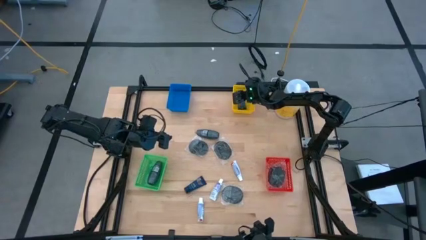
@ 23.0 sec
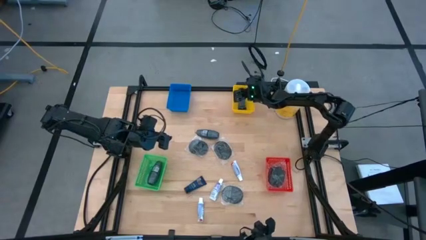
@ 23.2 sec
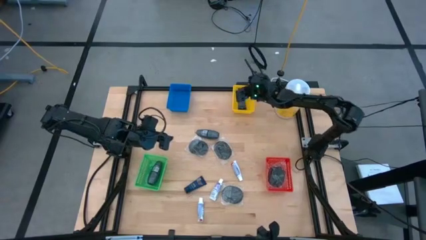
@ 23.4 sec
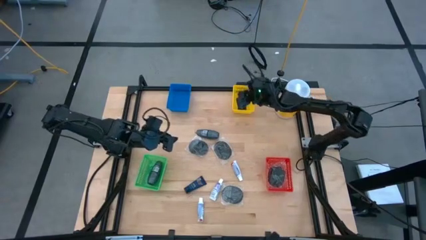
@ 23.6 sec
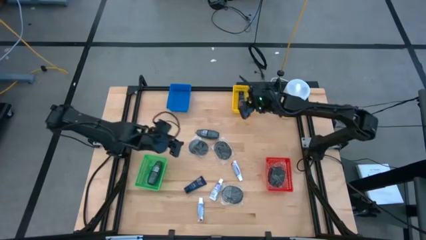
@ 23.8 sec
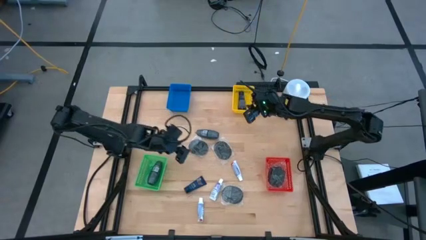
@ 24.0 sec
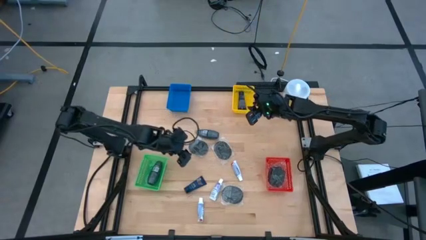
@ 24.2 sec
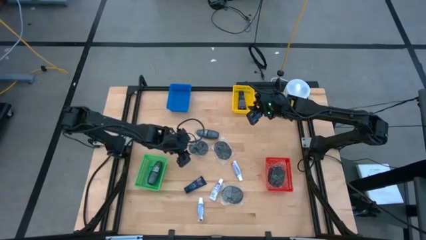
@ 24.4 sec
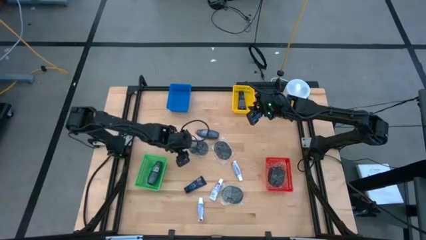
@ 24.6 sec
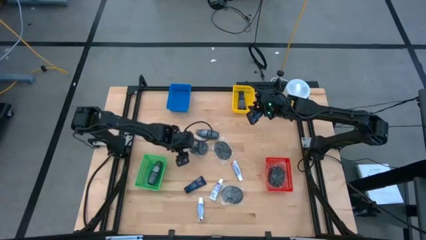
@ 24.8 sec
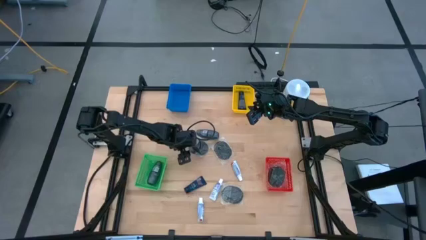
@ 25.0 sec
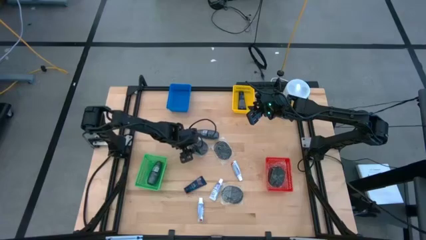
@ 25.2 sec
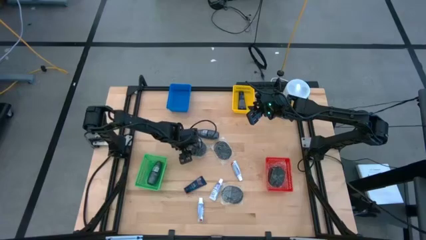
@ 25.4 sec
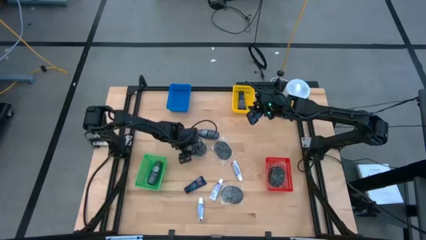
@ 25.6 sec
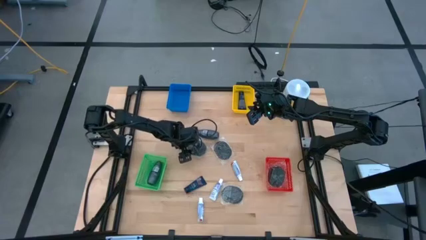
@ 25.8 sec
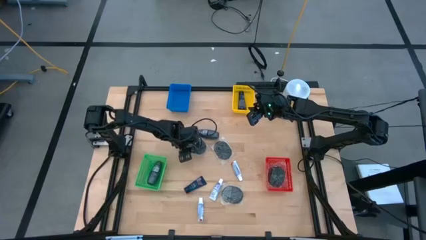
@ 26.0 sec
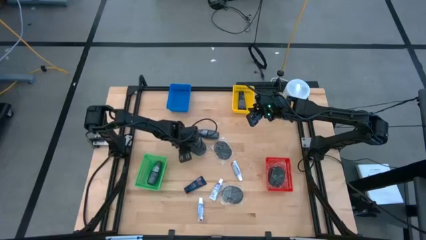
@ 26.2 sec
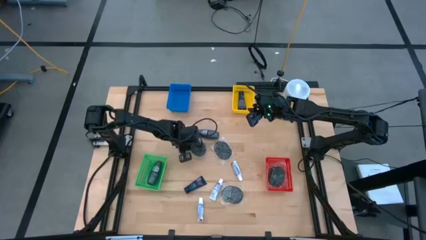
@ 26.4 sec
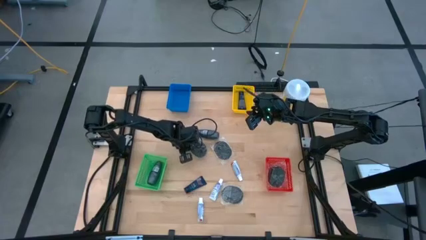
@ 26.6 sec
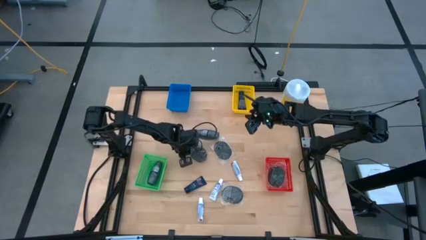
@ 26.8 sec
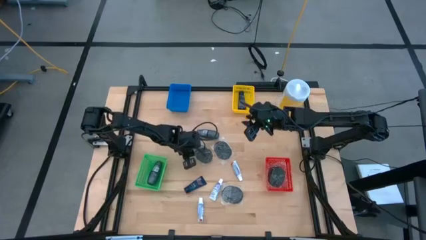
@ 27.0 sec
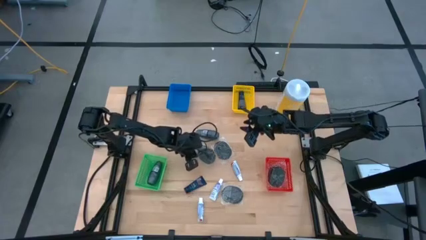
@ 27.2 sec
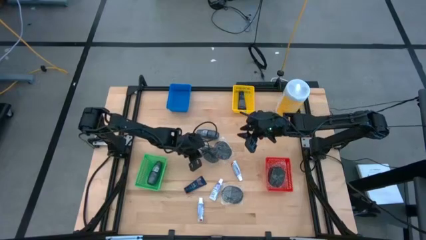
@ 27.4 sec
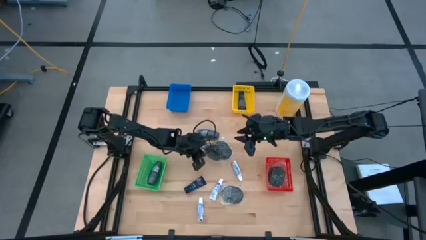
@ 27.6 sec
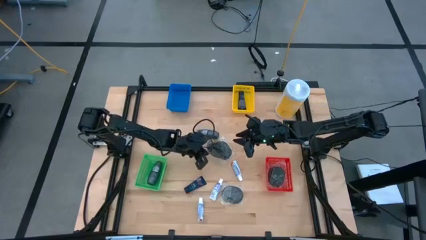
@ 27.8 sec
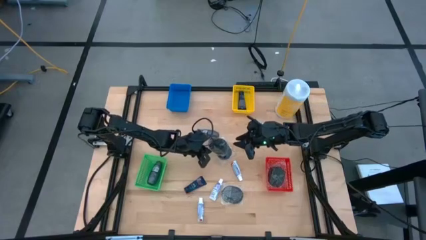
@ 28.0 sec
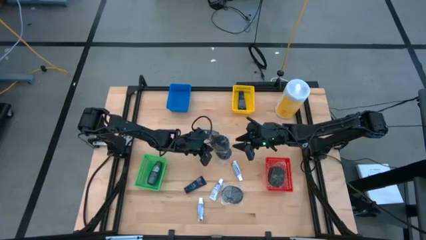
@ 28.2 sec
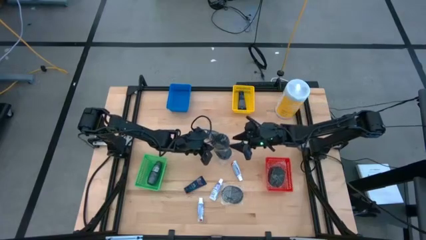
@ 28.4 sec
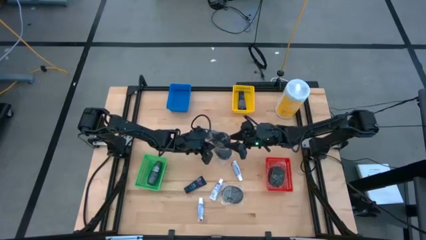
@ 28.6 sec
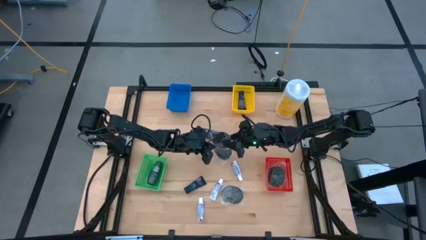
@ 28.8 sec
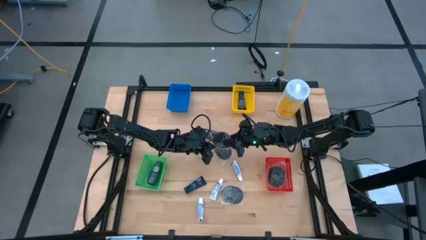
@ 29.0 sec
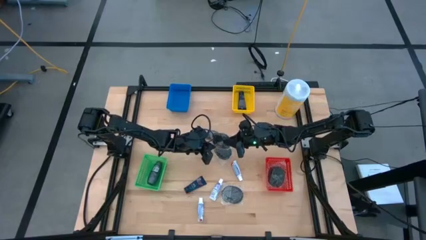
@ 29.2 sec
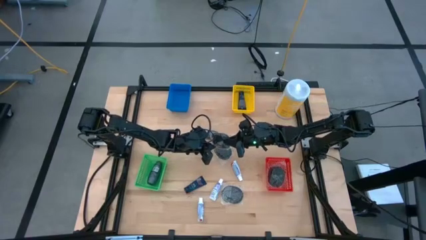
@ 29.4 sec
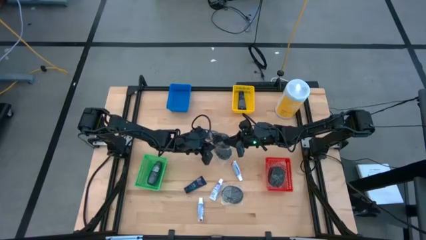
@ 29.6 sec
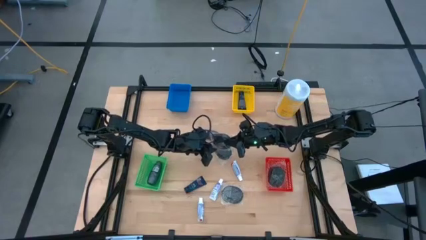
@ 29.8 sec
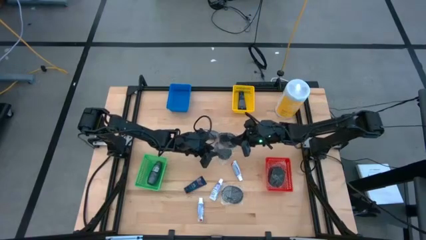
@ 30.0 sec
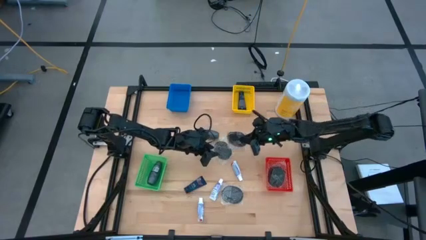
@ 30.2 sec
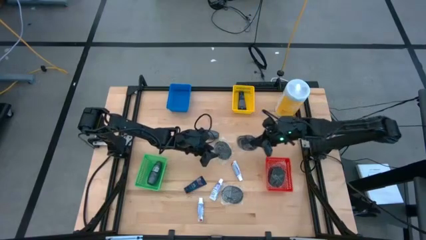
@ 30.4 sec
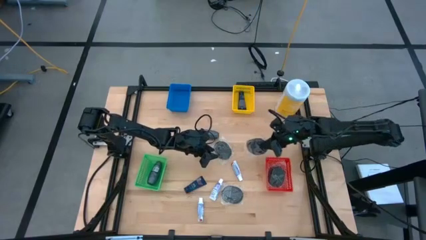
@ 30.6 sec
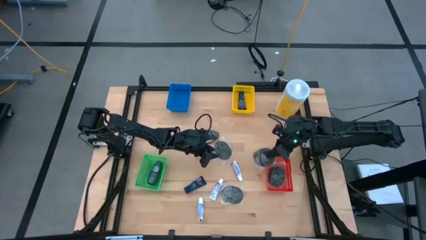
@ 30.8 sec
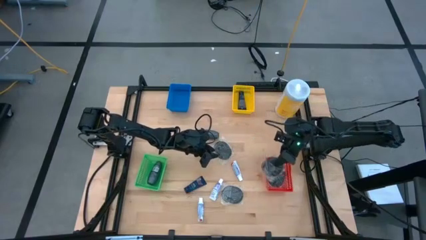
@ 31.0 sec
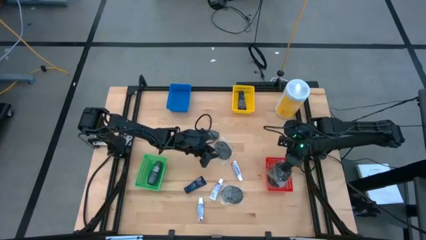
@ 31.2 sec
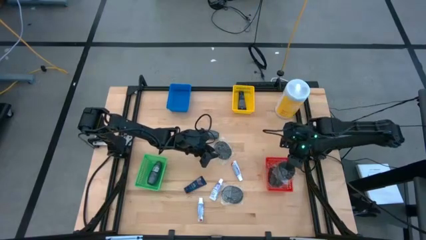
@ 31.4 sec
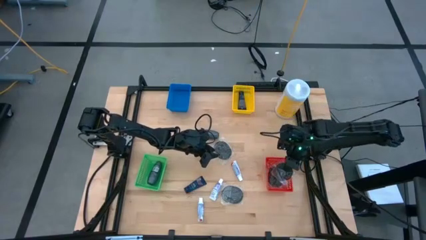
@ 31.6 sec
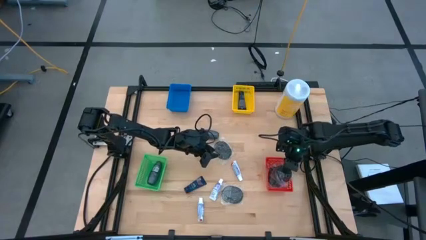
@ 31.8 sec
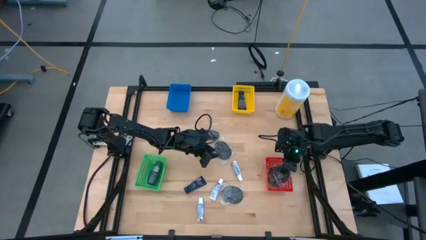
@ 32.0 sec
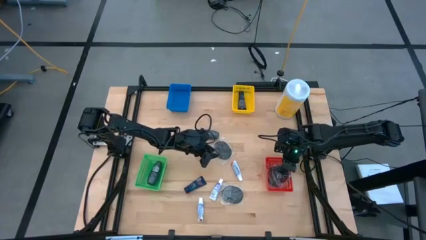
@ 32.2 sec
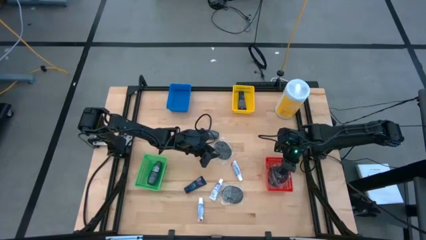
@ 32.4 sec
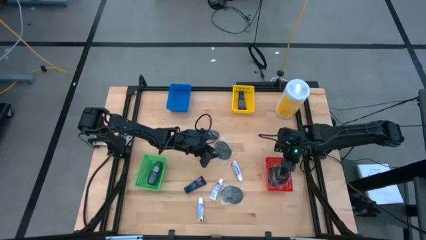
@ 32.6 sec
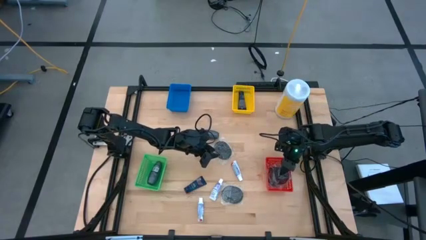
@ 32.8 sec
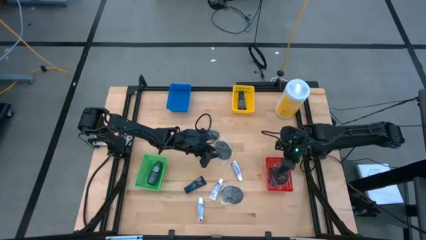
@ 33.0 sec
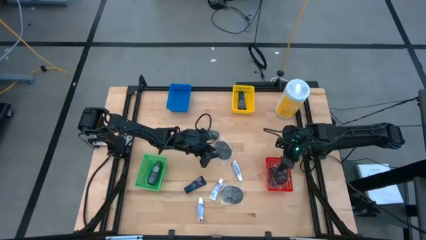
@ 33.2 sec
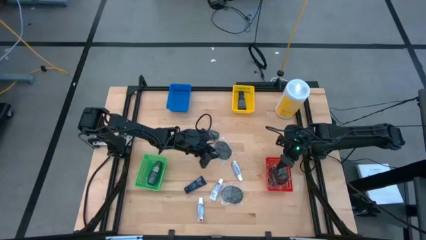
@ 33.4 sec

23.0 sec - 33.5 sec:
Task: Pick & Place Travel size toiletries
Put the hairbrush into the red basket
